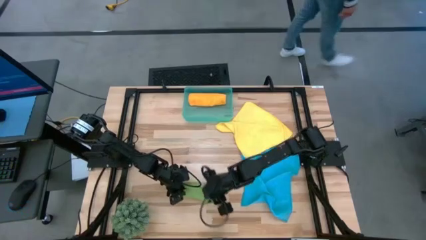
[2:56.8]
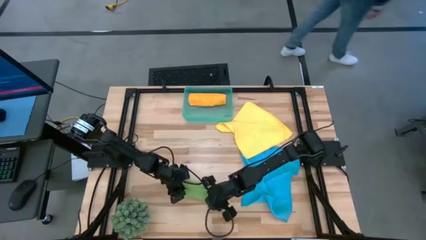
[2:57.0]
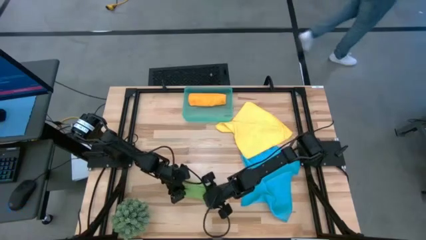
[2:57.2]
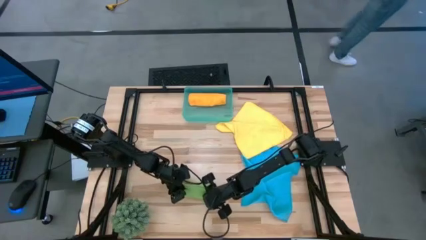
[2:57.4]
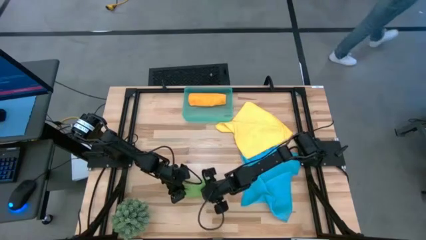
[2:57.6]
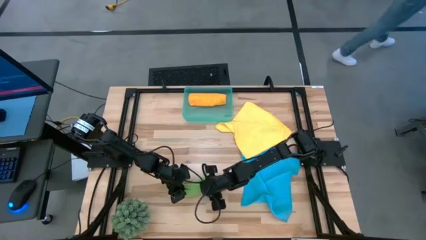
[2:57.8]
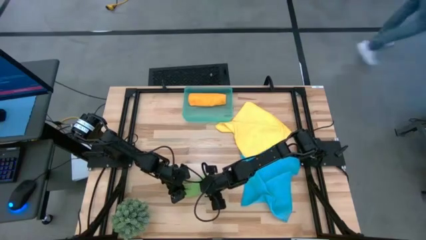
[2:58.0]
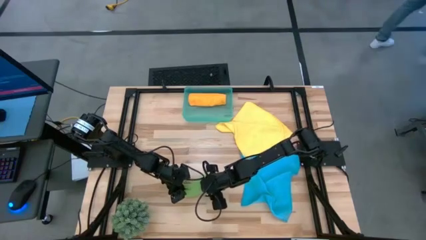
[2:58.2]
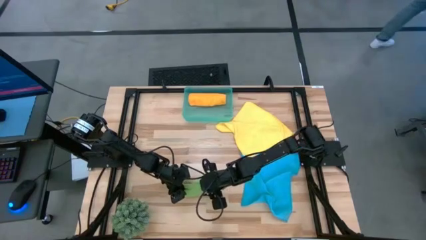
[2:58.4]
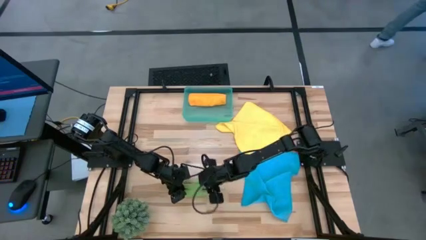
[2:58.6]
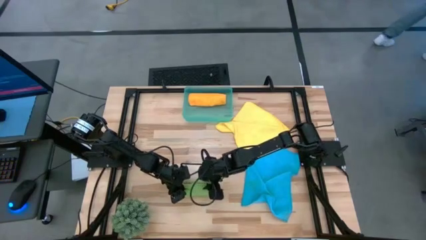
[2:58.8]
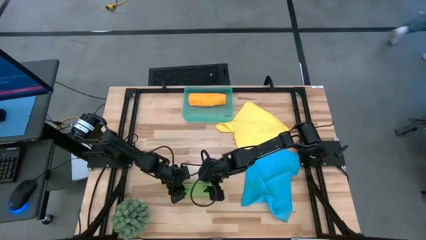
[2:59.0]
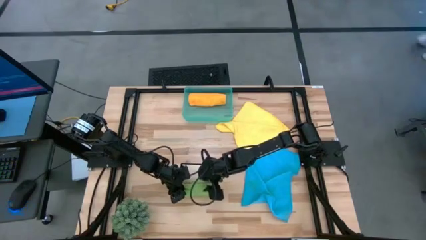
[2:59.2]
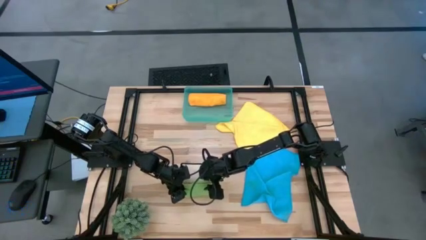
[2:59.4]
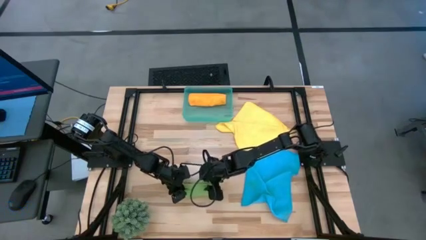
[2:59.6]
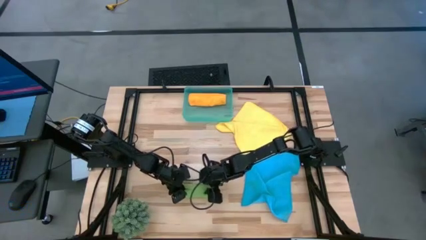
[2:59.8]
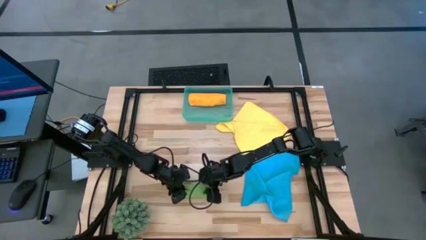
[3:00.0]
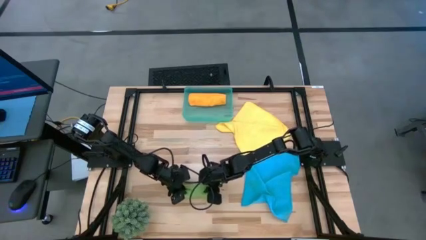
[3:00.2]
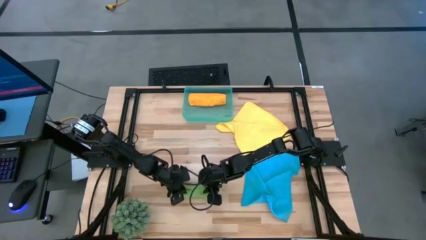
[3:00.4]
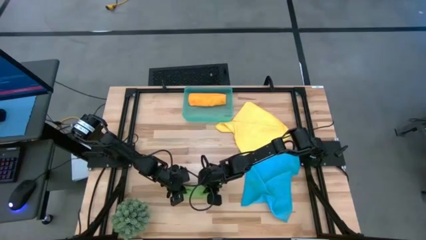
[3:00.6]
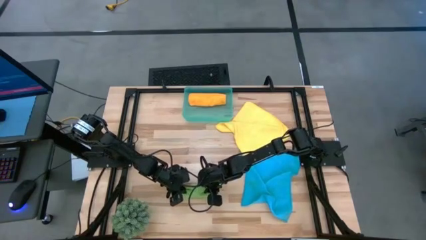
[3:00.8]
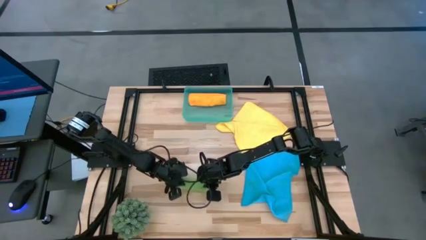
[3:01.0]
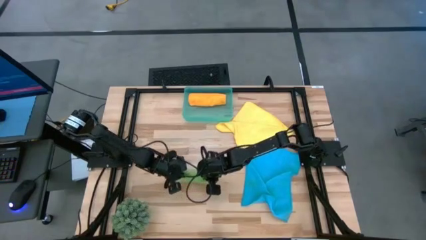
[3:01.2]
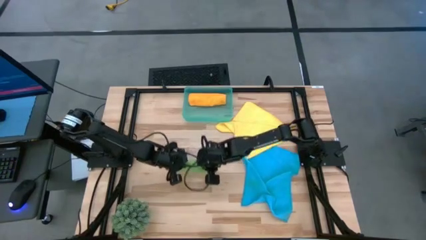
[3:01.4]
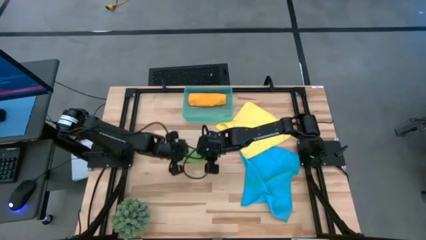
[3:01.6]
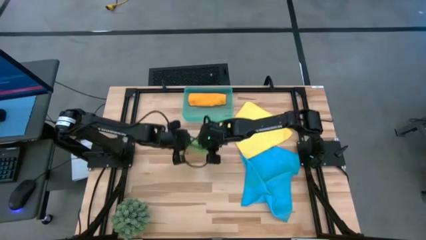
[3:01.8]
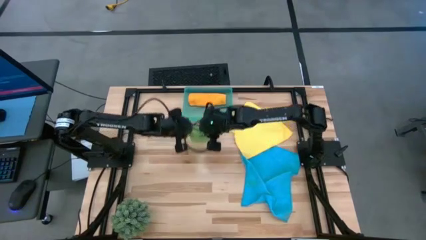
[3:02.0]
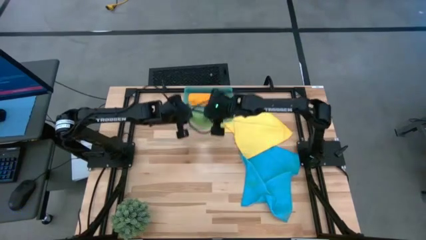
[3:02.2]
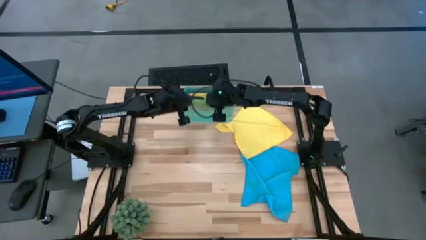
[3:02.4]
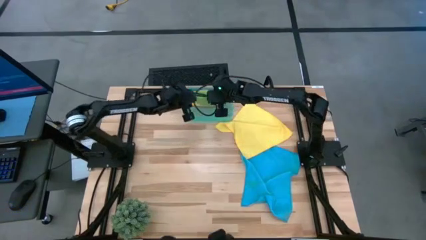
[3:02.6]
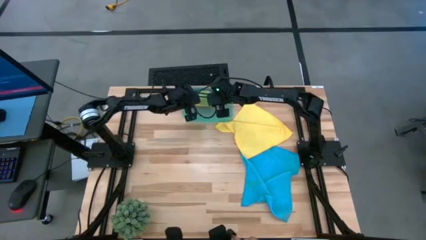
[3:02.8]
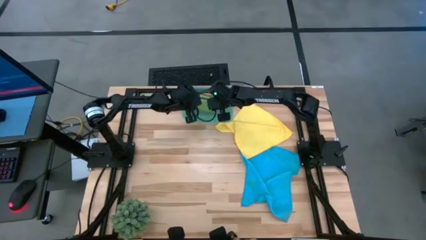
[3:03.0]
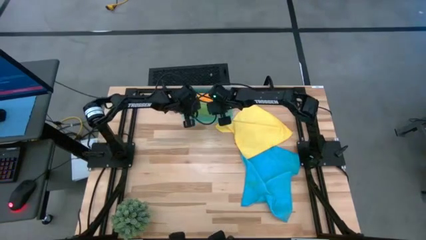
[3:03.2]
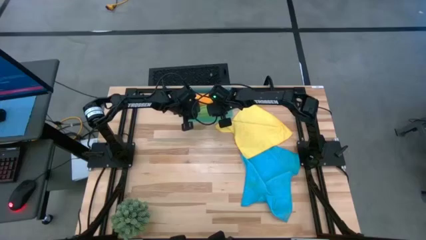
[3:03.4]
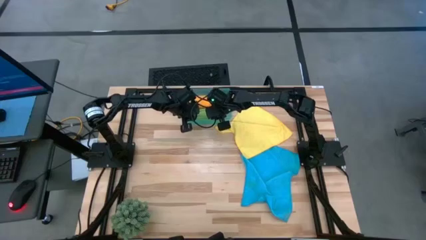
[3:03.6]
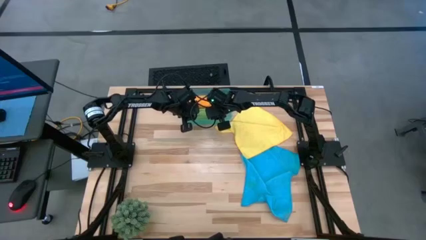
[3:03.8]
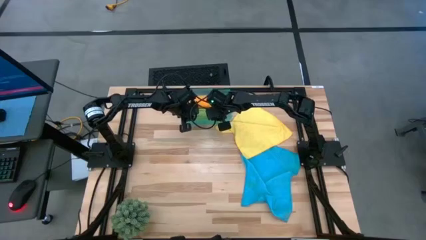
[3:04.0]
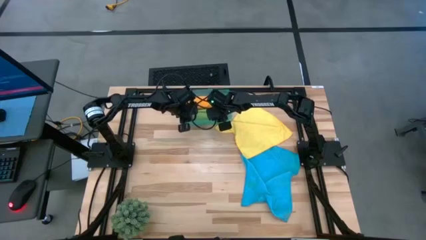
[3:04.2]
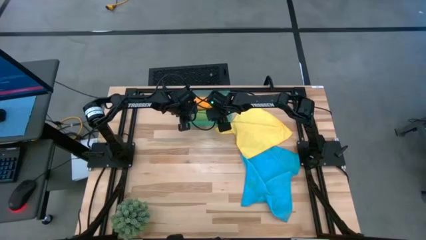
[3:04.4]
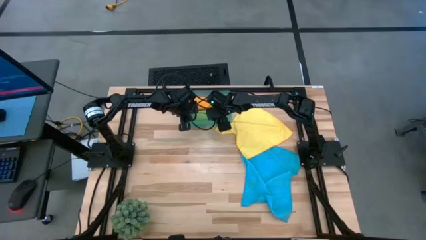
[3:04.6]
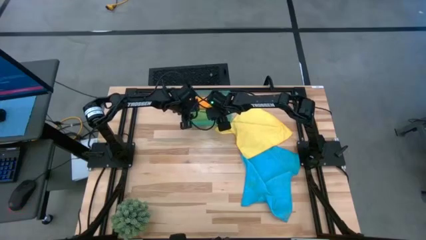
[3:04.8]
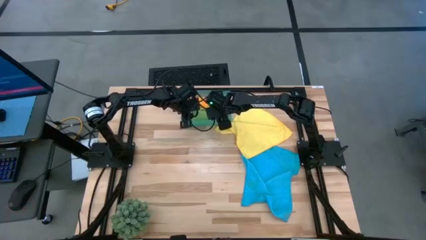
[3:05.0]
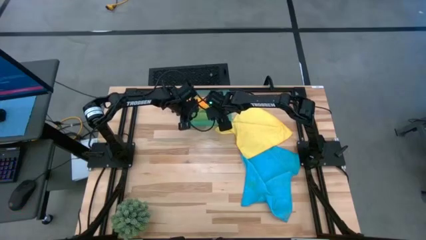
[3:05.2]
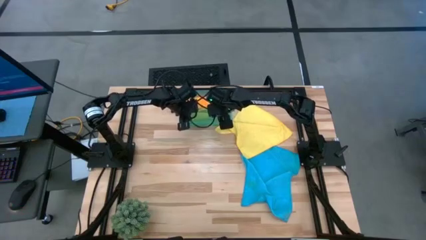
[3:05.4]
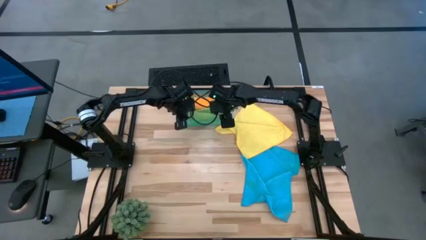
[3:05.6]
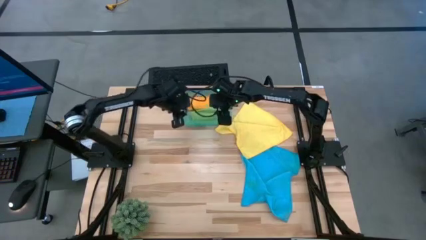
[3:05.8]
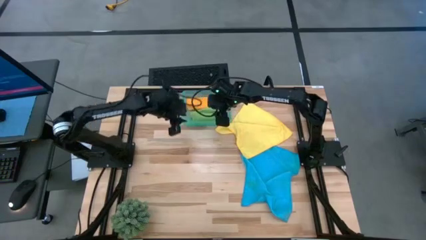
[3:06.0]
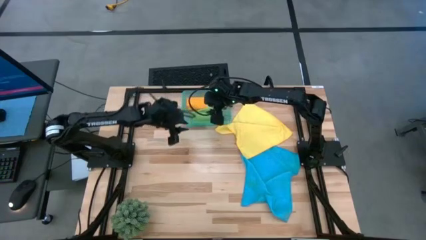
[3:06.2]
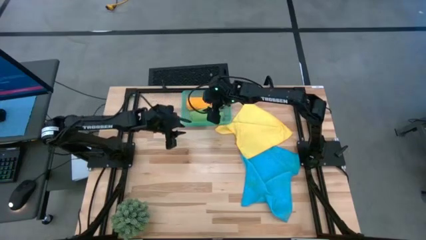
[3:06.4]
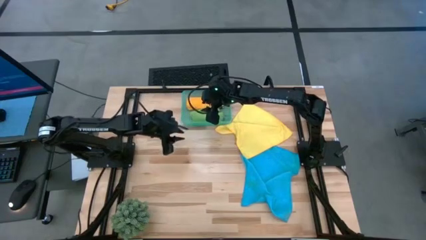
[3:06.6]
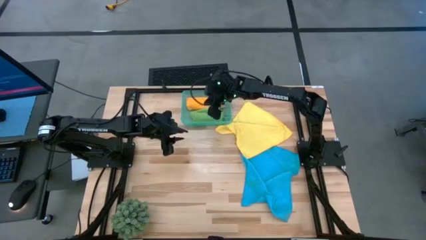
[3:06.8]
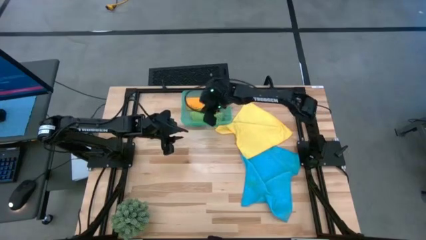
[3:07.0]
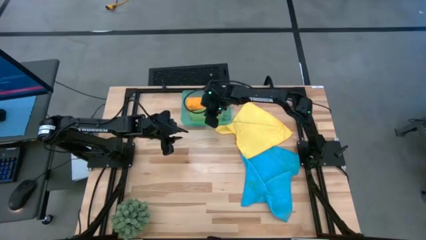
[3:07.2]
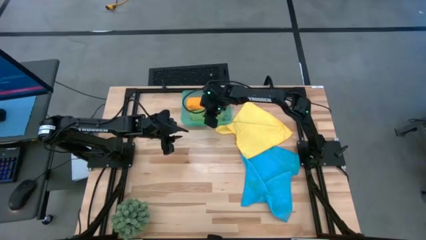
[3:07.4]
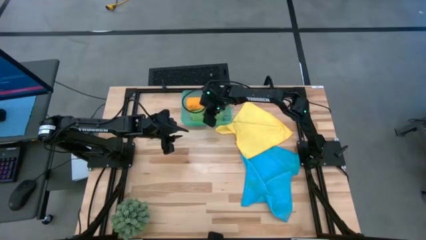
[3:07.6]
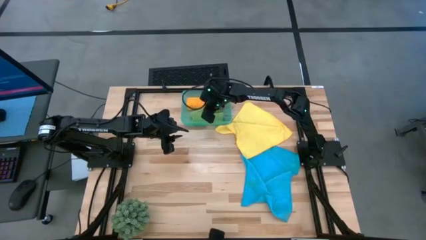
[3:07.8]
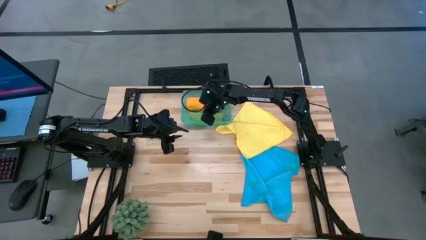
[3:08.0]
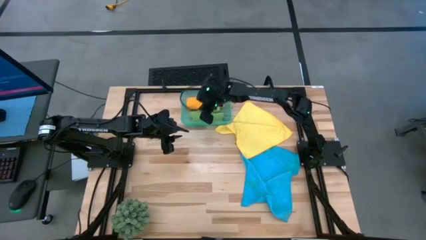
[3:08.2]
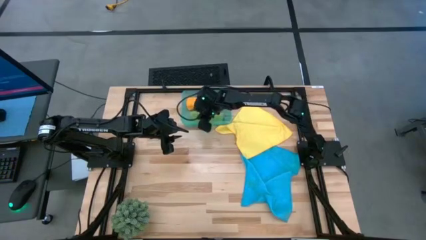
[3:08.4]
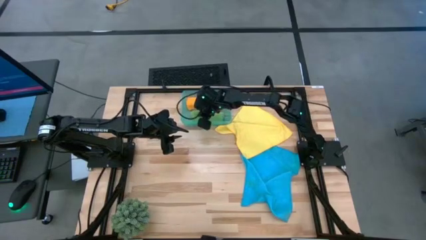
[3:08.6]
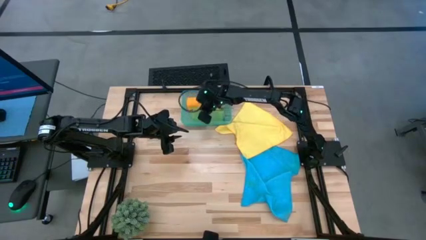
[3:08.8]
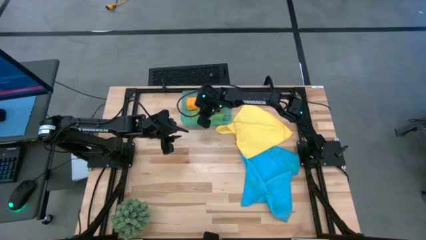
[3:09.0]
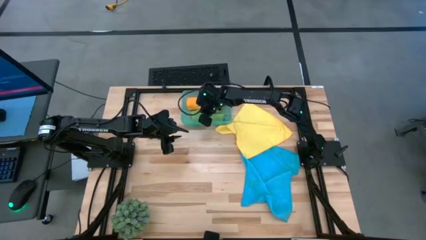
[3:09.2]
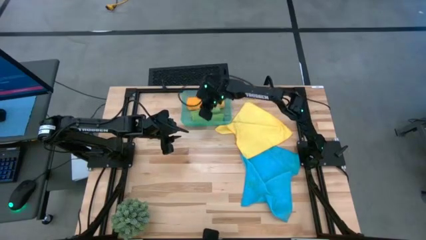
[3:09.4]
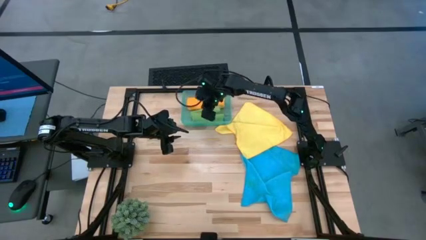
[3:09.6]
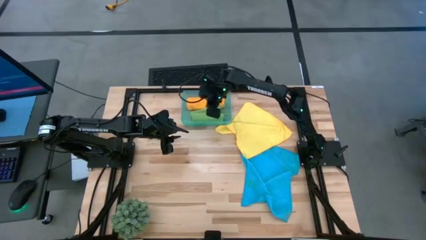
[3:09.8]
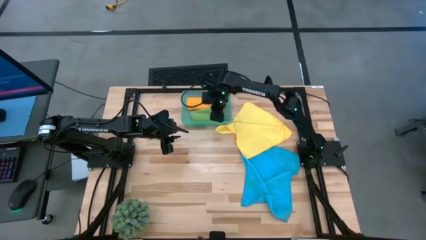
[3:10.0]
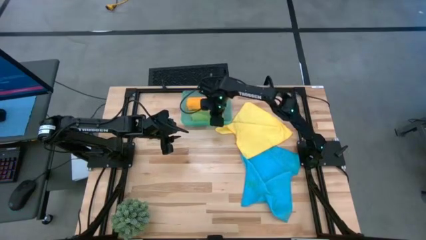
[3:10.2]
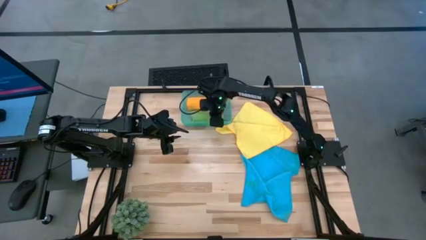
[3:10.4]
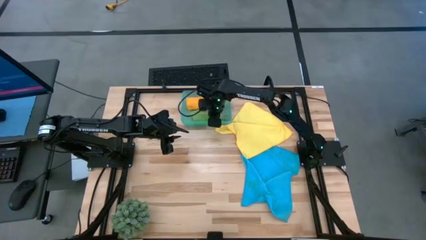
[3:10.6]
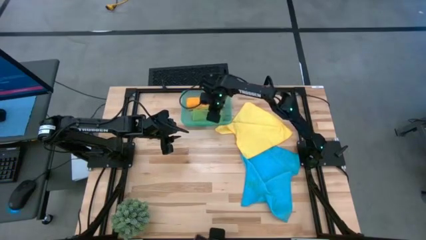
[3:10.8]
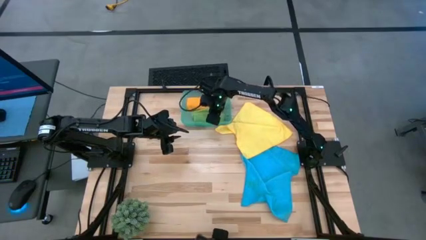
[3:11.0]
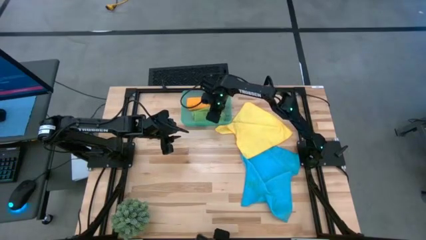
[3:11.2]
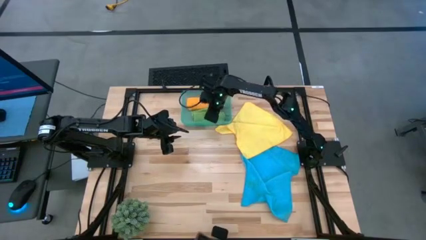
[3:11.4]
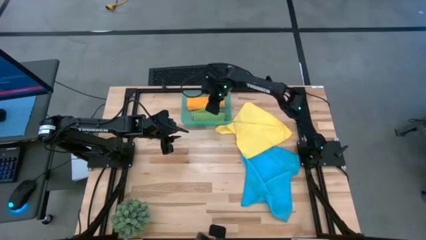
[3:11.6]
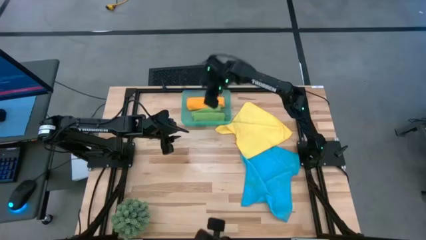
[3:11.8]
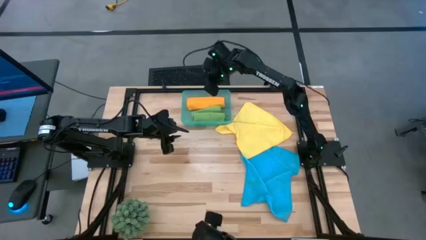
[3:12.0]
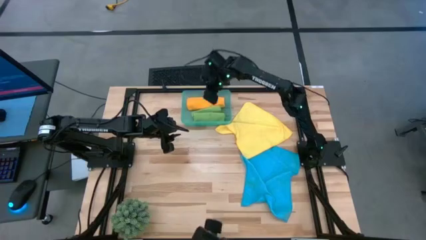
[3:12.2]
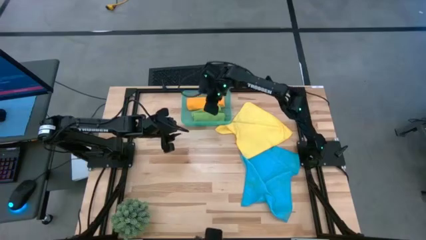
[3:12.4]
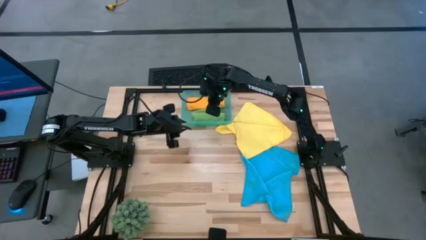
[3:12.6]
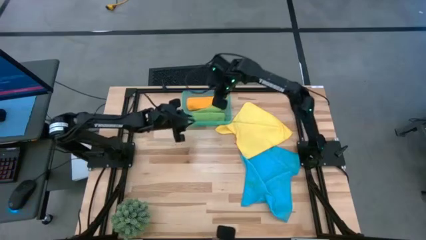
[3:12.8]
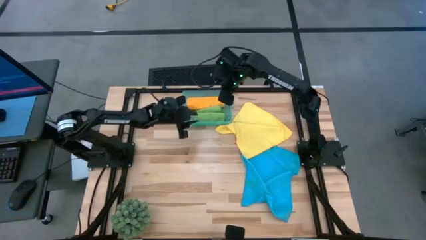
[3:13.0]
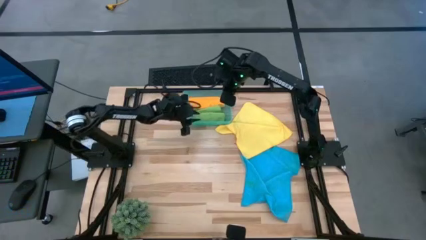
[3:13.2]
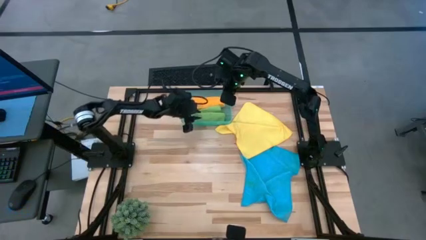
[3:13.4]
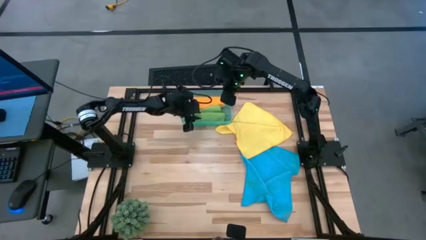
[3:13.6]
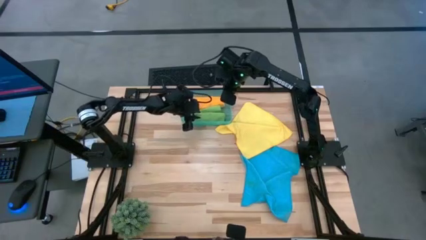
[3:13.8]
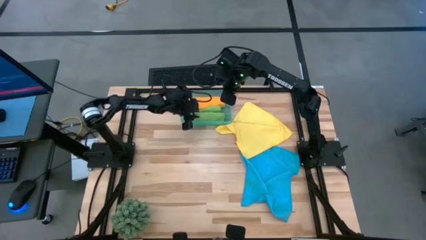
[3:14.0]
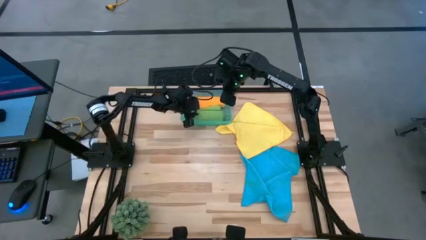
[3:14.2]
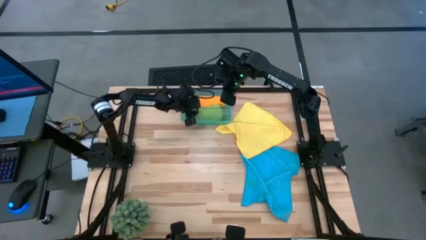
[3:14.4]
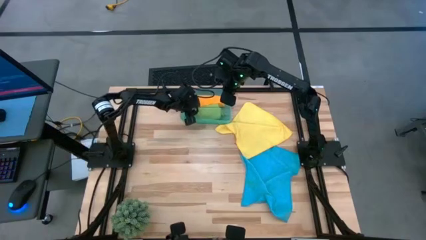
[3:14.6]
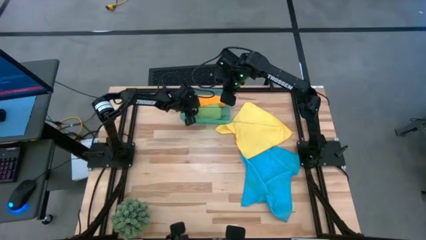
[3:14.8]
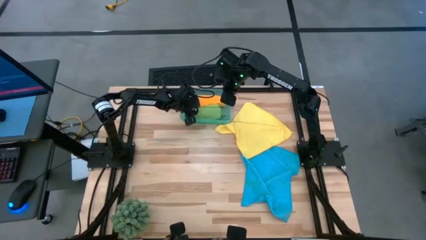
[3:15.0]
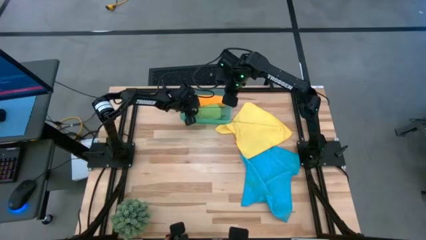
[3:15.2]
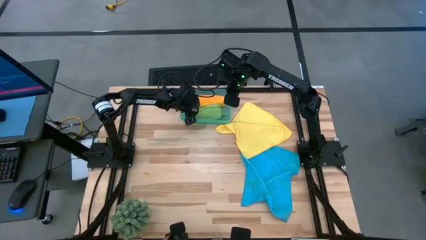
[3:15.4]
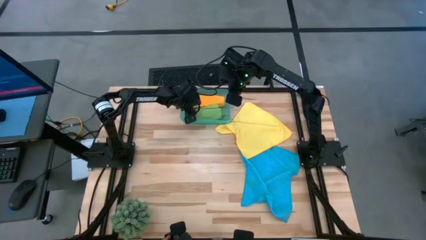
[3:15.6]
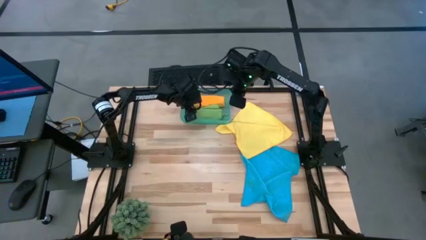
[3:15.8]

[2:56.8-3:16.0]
Task: Roll microfiber towels into tight, uniform cylinder then place into a basket
Put the green towel into the bin
